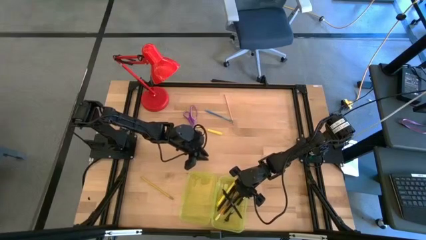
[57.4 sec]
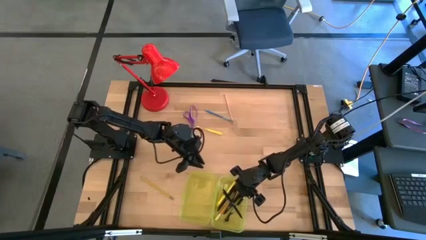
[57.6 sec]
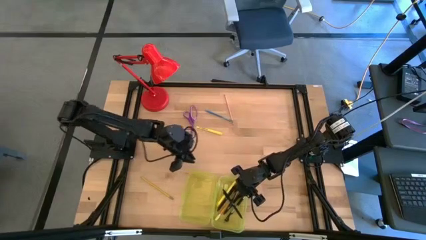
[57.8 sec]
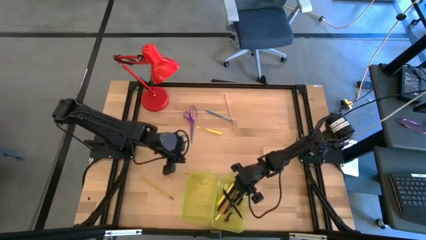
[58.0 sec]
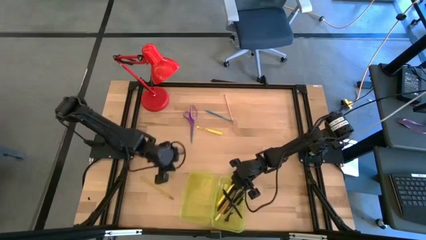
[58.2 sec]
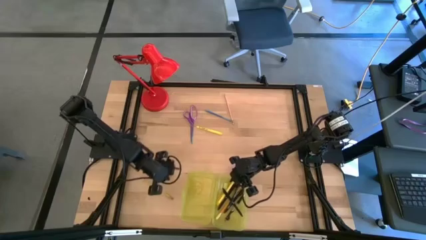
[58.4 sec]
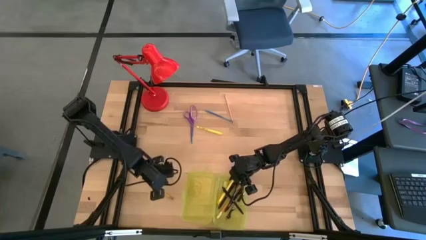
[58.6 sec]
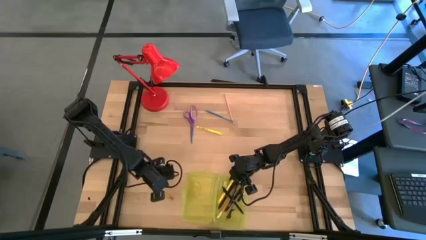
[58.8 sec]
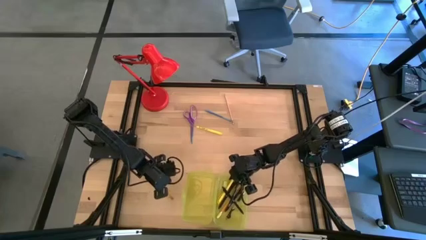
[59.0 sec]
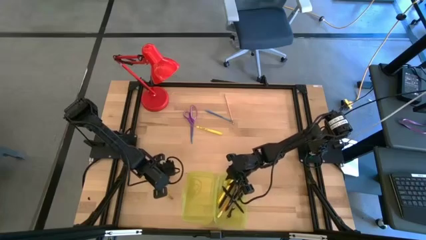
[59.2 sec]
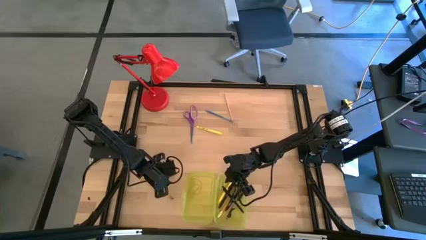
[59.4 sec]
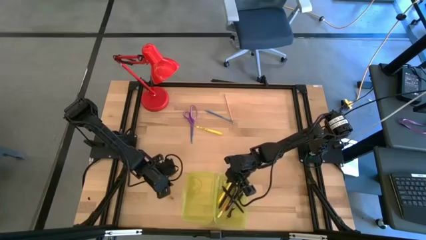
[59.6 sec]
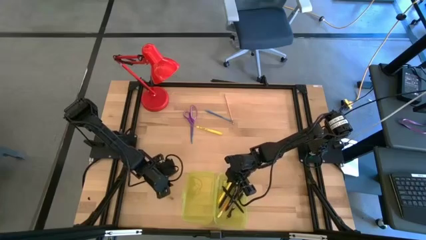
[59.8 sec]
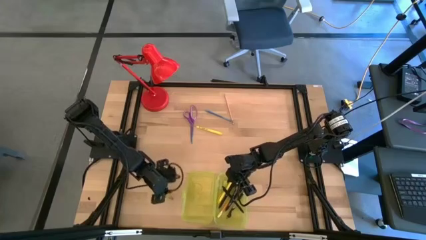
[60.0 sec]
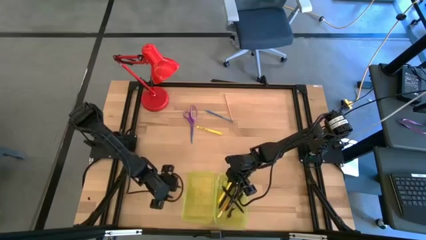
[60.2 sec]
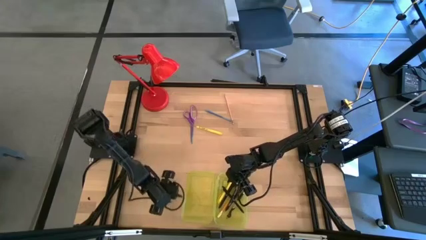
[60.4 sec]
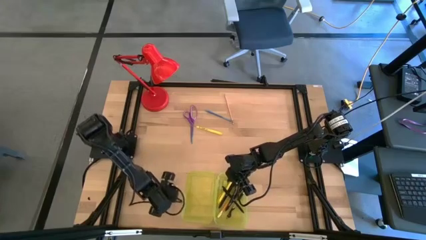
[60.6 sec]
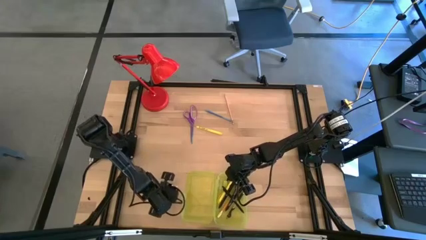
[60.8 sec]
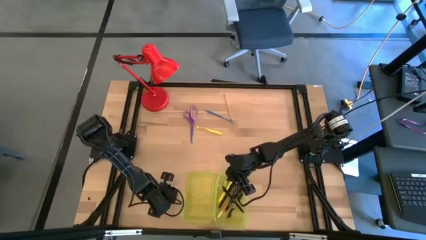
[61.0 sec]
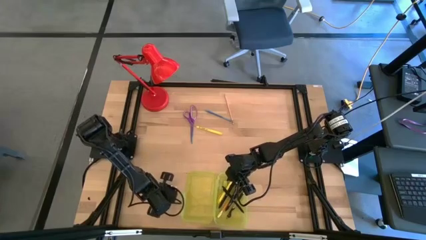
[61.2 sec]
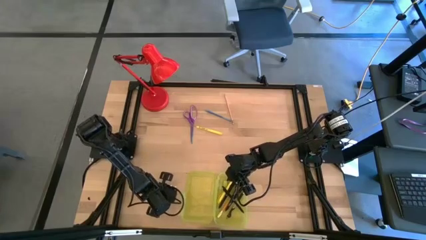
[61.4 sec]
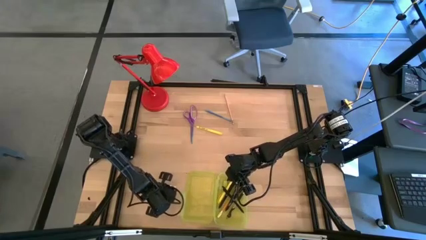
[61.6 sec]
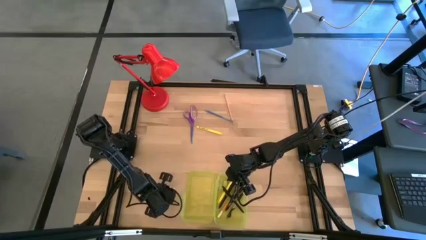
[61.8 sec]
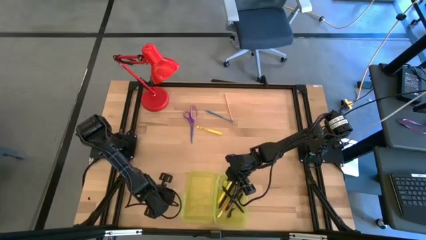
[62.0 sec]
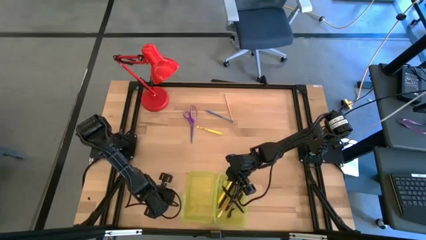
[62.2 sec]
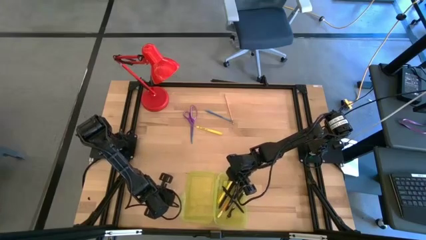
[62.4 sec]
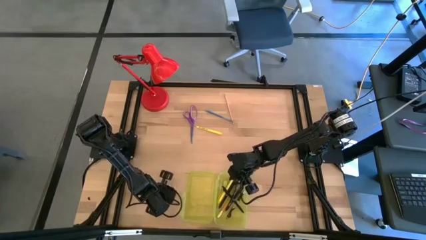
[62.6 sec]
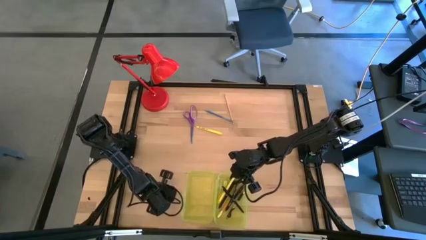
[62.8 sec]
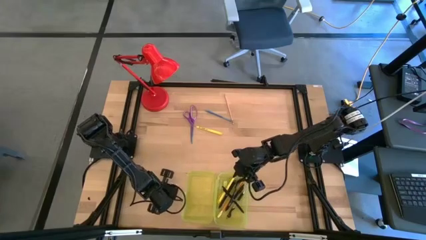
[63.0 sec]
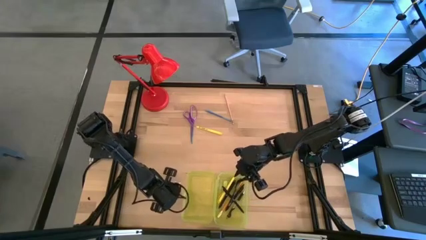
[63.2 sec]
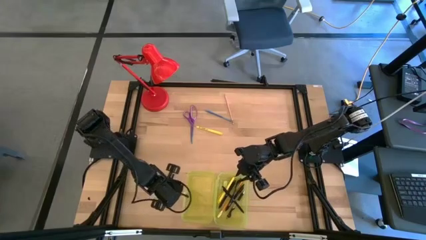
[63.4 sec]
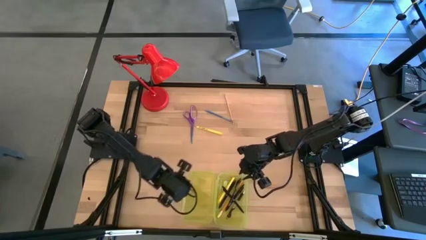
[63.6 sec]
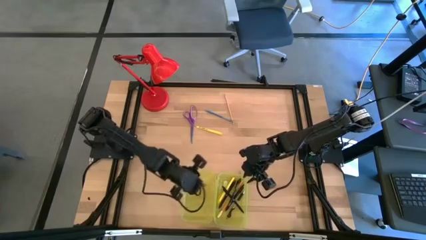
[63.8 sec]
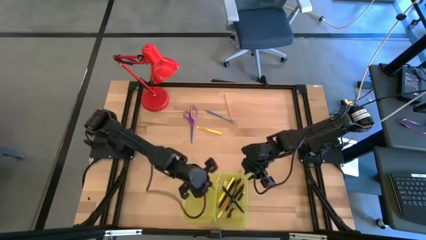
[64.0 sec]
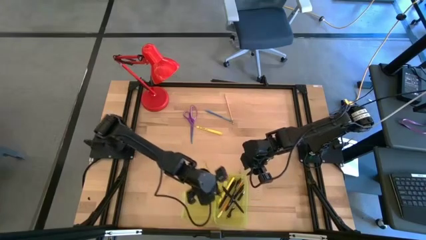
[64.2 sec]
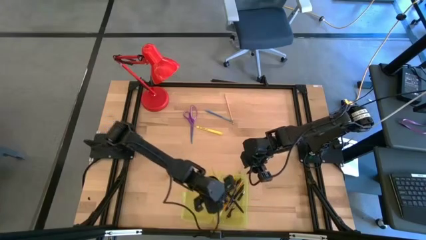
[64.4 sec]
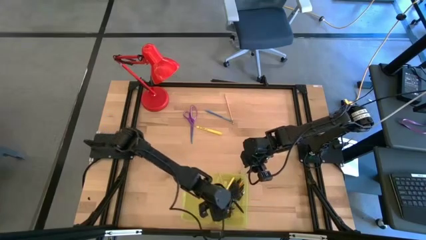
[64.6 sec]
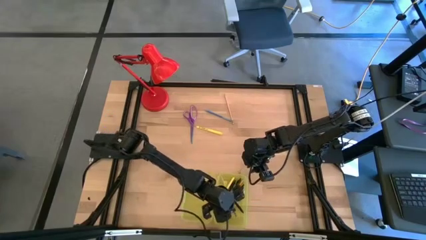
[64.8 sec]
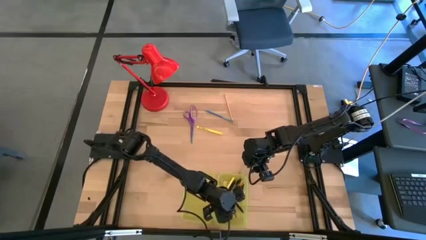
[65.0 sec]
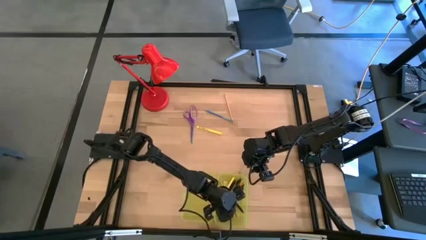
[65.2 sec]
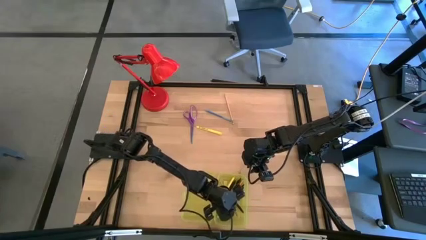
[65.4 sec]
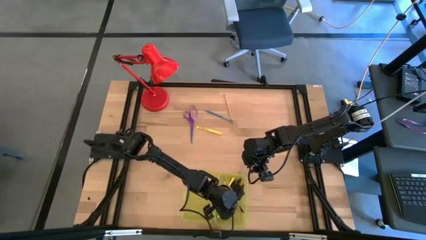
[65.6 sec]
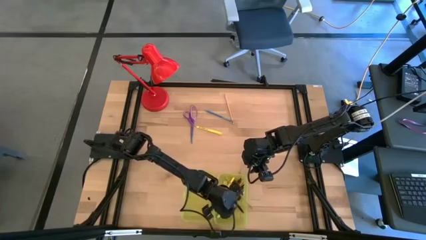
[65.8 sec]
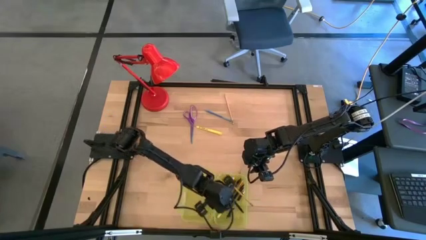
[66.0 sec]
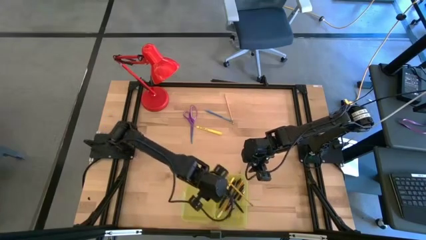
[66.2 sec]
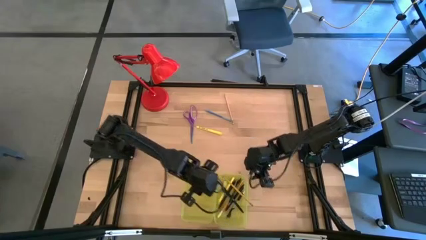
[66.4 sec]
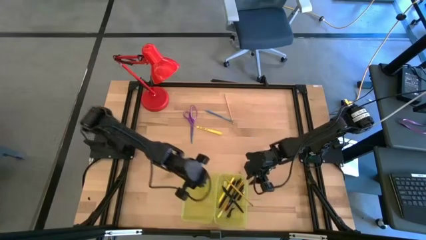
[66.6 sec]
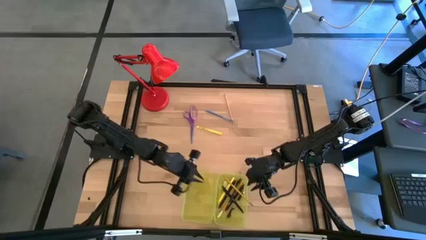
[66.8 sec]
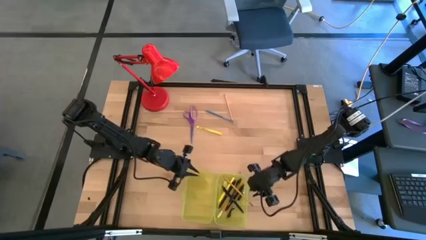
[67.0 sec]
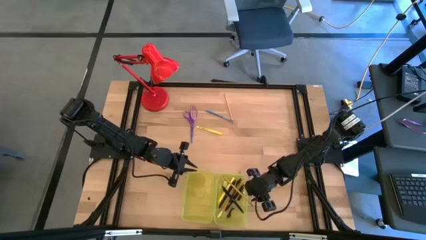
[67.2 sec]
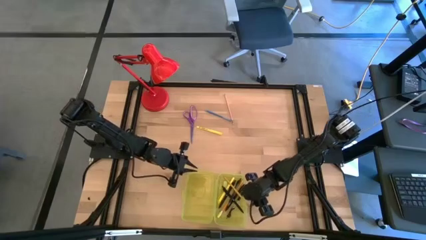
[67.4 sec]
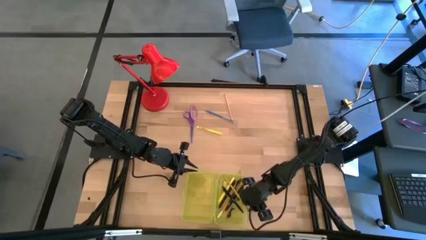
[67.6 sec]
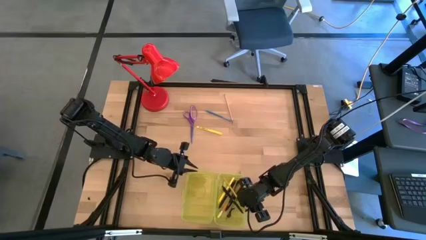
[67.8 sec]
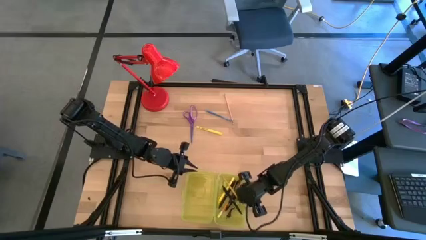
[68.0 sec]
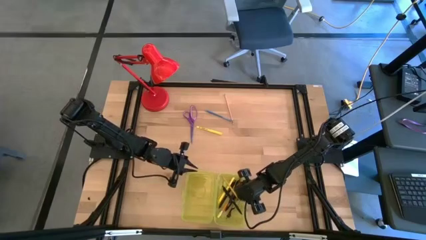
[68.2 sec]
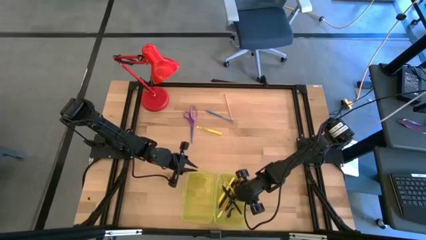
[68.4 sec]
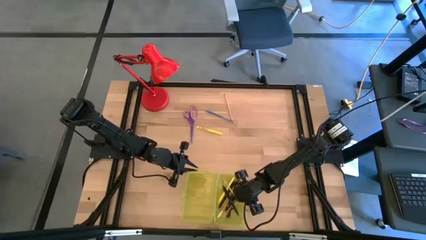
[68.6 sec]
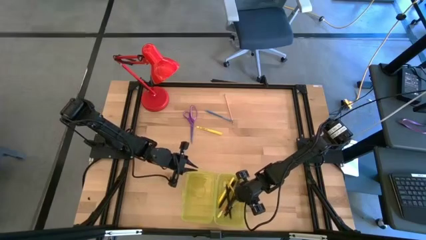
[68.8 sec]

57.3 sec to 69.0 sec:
Task: Pick & place school supplies into a supply box
Put the yellow pencil into the yellow supply box

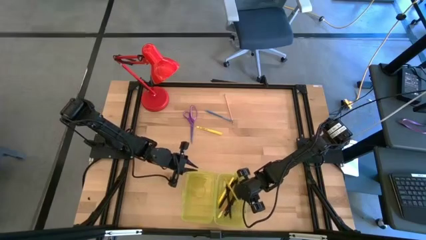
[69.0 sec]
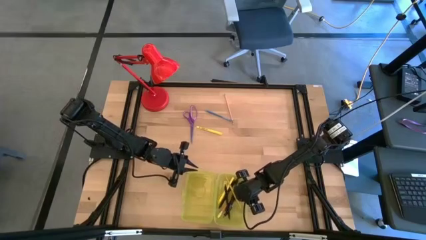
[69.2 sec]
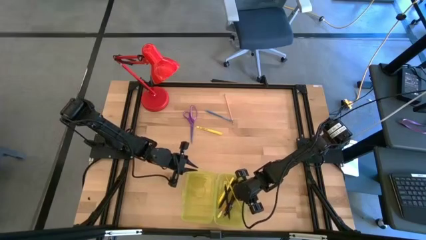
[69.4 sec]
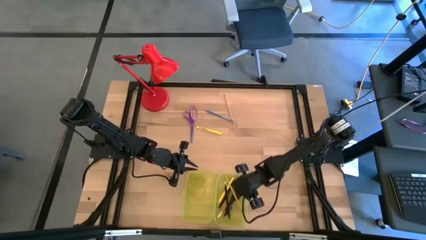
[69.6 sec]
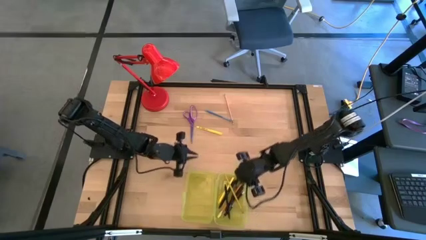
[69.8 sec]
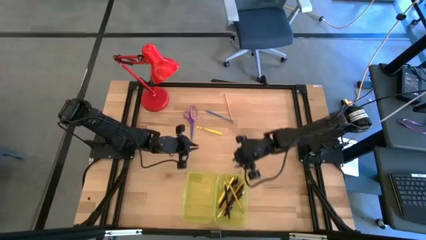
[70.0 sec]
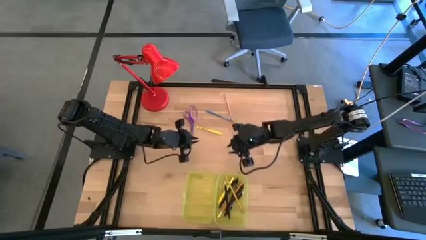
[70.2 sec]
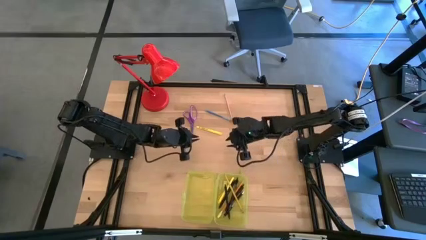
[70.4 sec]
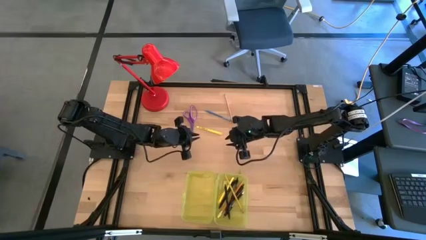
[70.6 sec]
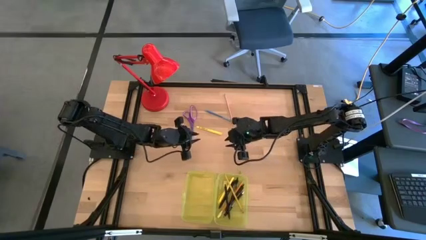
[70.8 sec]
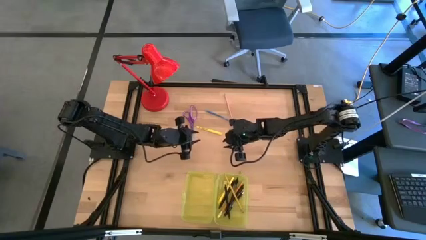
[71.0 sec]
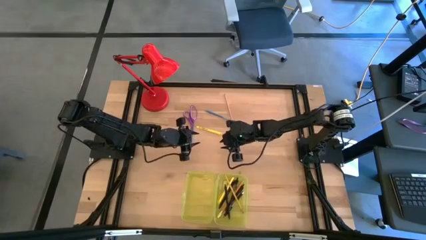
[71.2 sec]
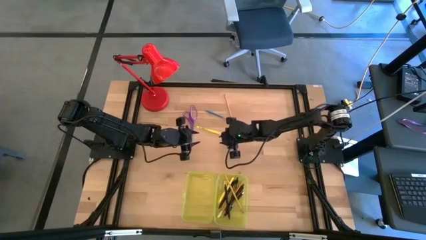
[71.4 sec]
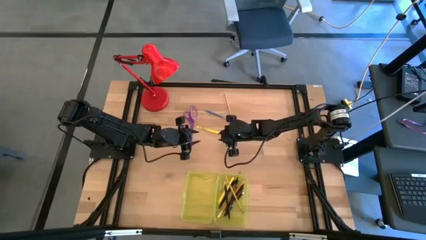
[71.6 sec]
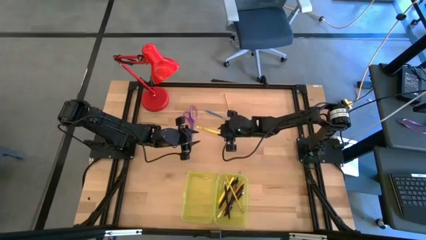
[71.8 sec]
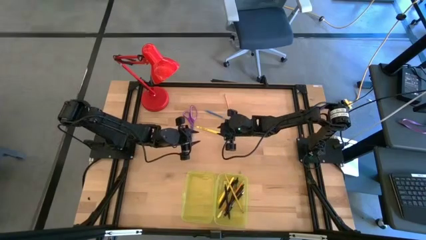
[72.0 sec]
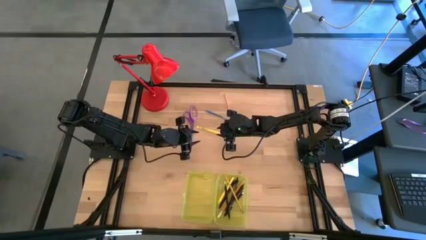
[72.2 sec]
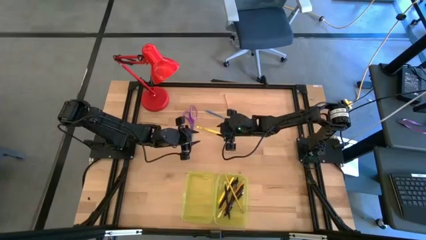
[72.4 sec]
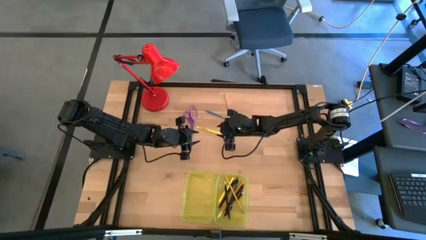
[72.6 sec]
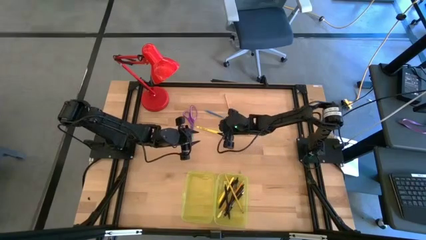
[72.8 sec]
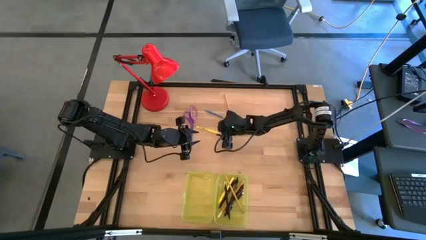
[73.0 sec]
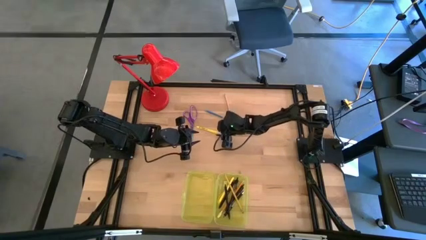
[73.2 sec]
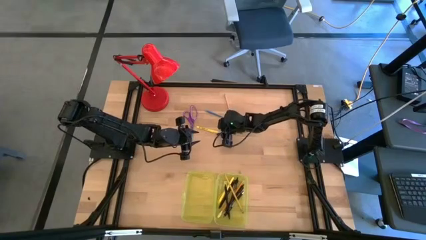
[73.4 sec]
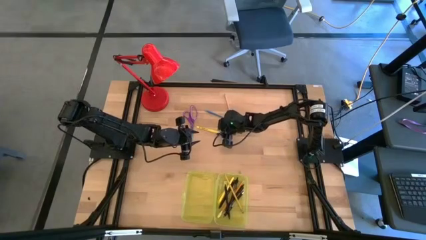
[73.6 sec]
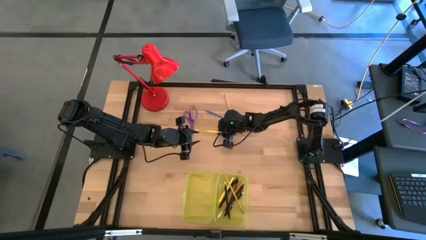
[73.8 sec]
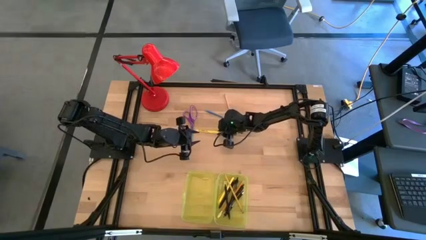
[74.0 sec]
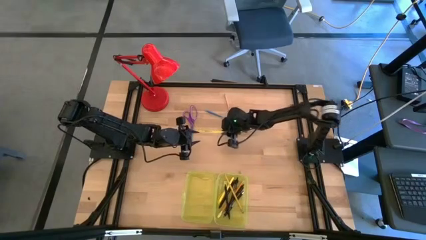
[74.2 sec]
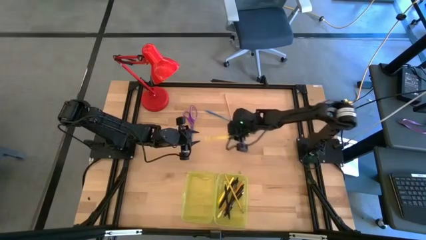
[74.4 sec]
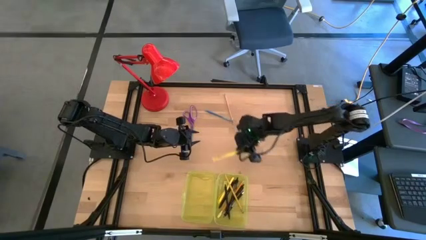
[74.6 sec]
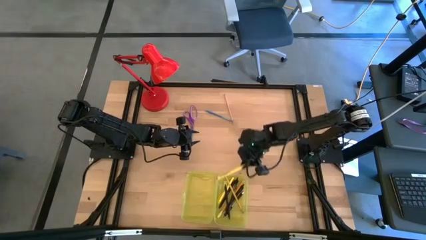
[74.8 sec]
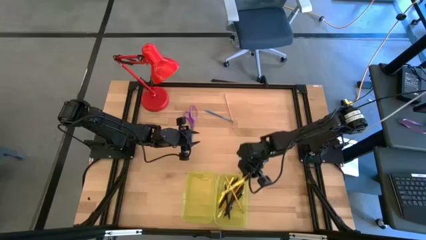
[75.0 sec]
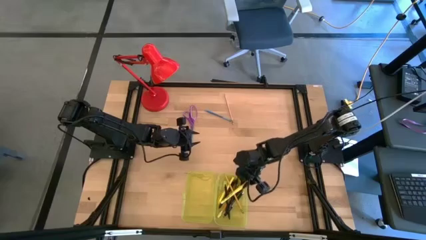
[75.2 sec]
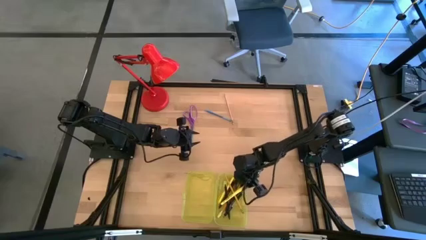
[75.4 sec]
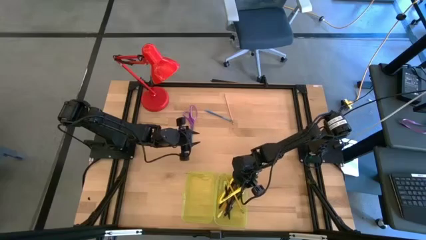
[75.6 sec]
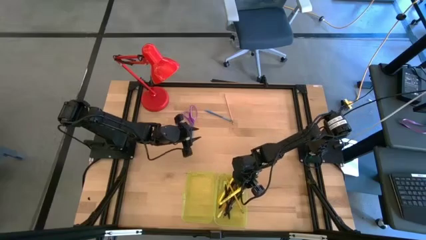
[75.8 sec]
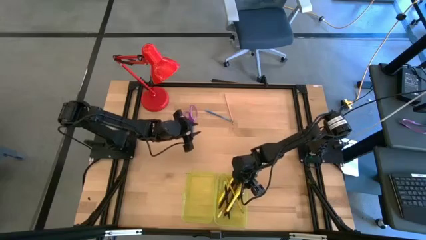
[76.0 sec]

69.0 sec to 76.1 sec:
Put the yellow pen into the yellow supply box
